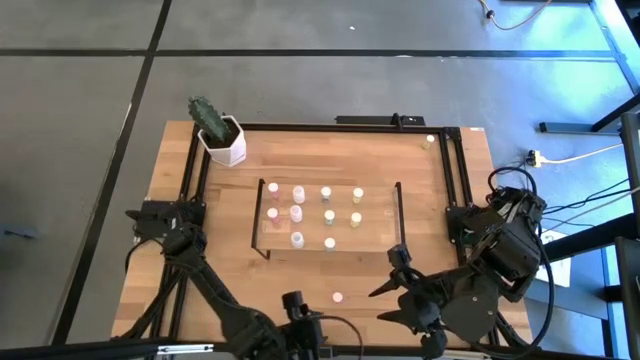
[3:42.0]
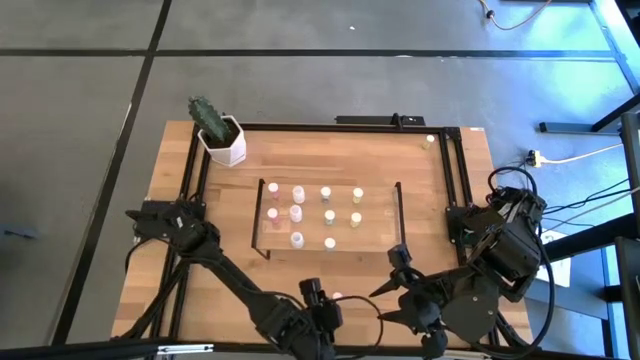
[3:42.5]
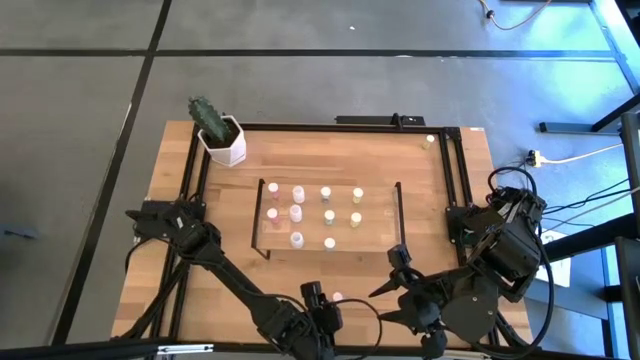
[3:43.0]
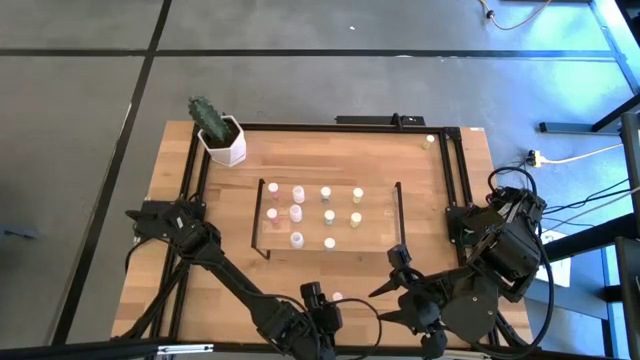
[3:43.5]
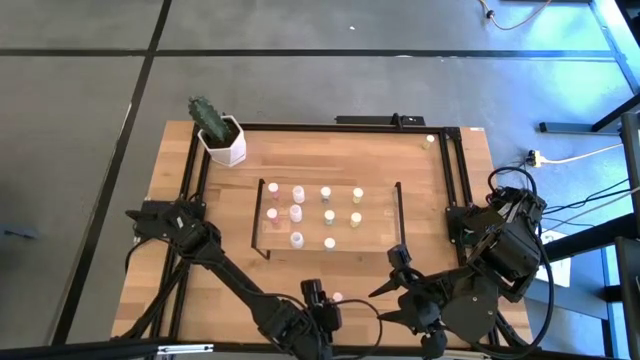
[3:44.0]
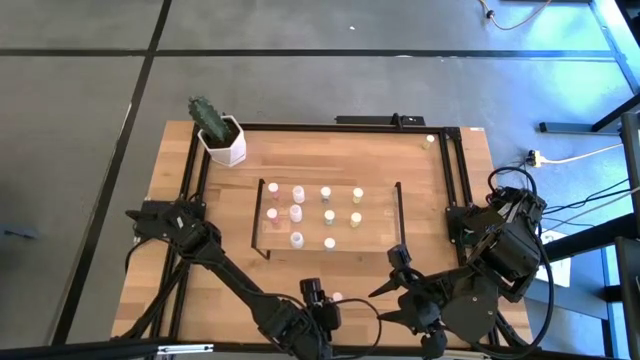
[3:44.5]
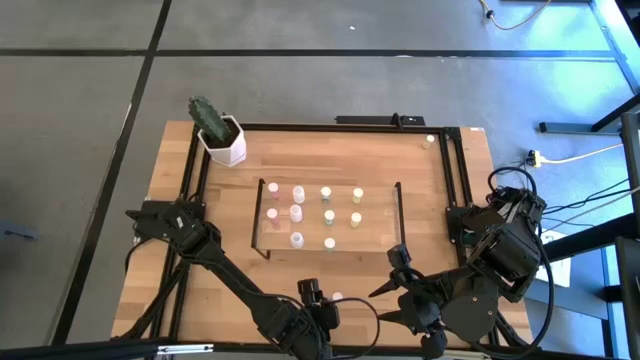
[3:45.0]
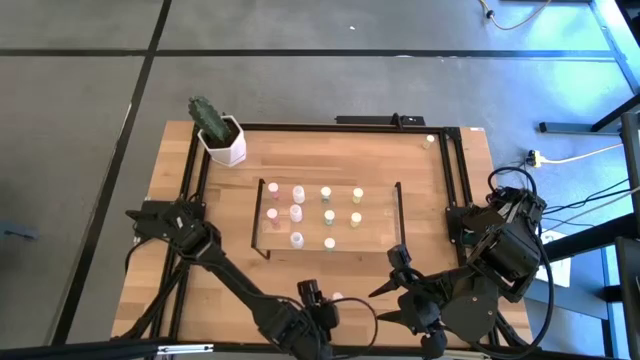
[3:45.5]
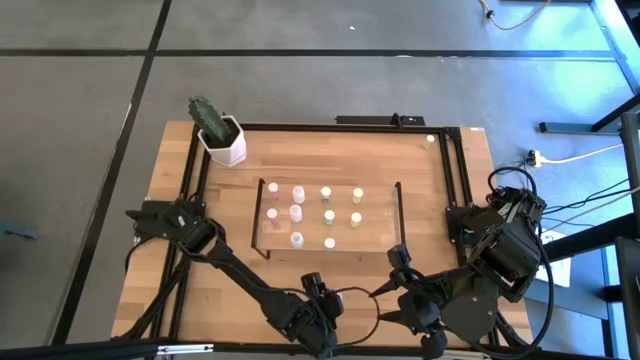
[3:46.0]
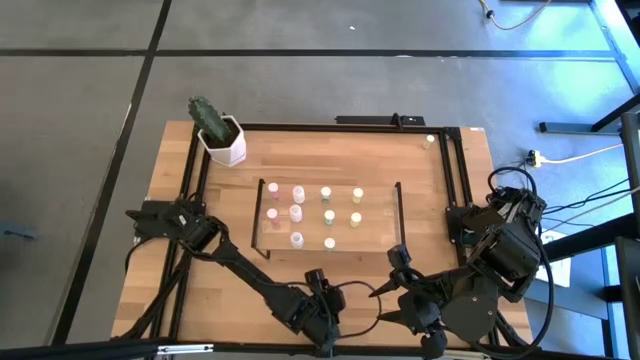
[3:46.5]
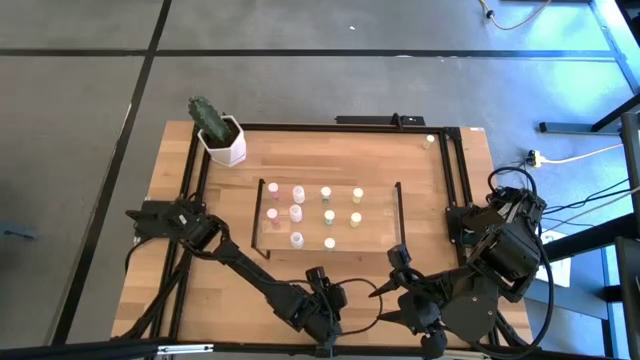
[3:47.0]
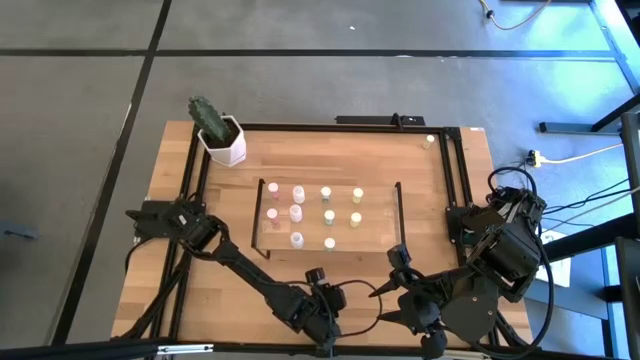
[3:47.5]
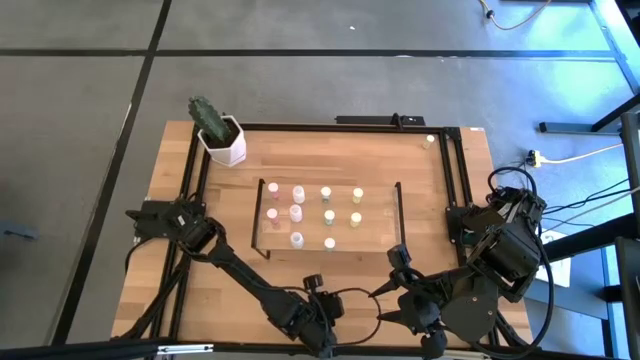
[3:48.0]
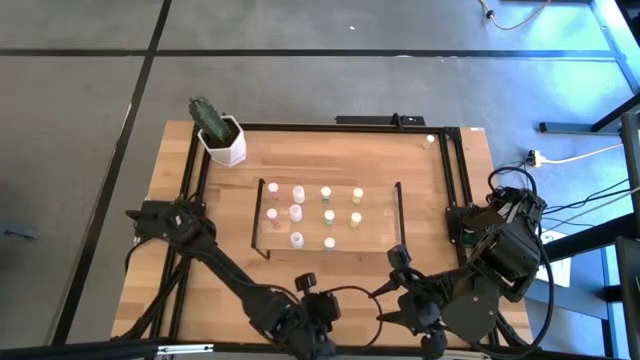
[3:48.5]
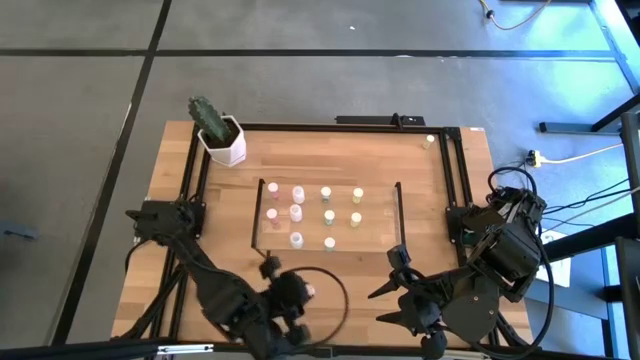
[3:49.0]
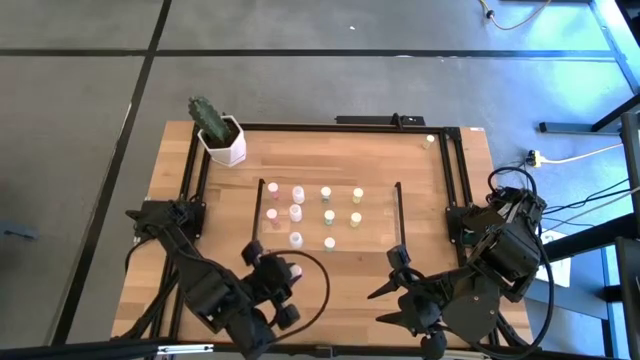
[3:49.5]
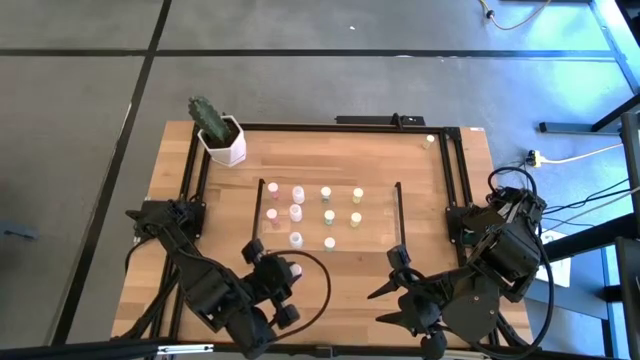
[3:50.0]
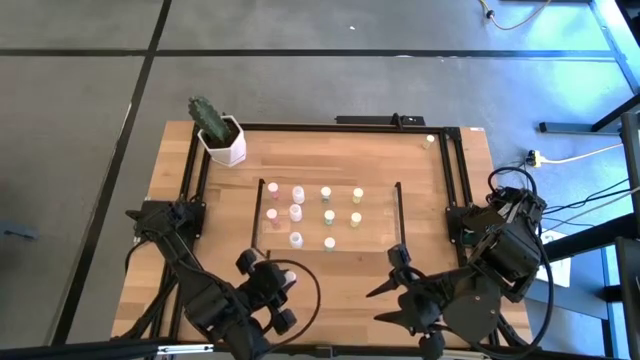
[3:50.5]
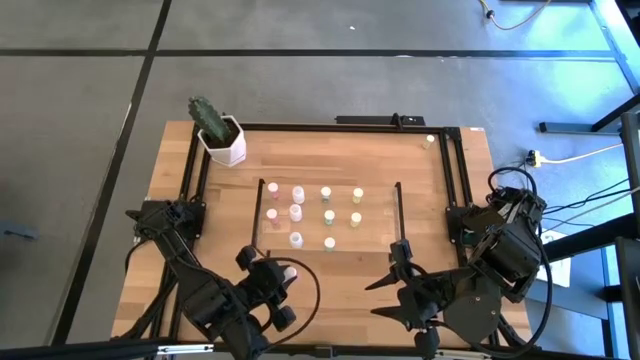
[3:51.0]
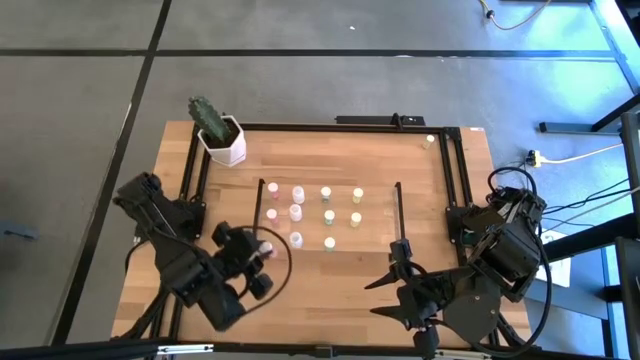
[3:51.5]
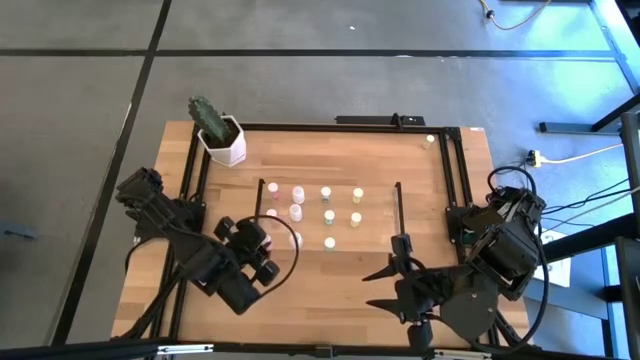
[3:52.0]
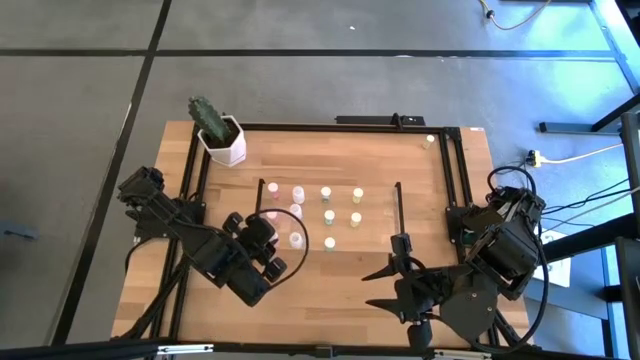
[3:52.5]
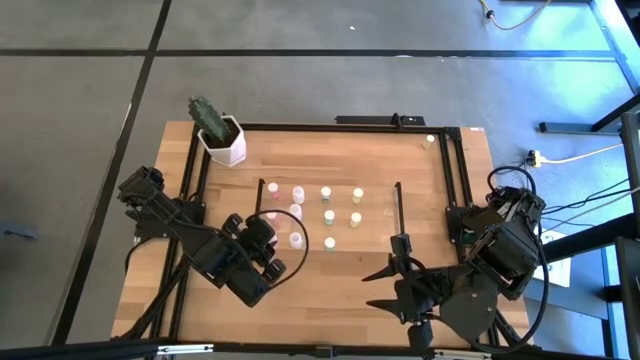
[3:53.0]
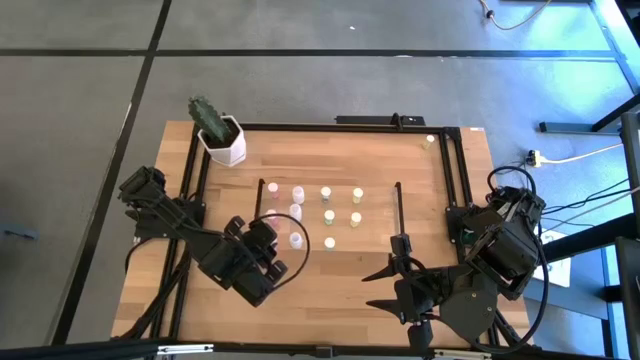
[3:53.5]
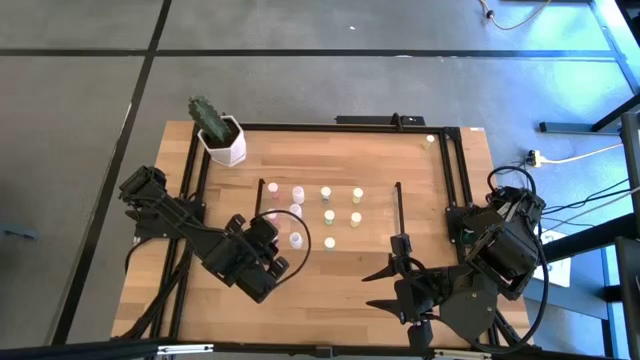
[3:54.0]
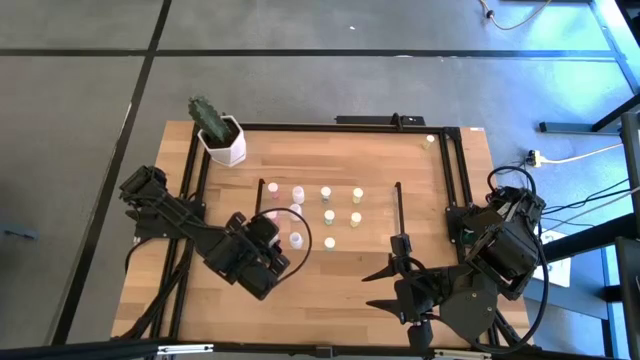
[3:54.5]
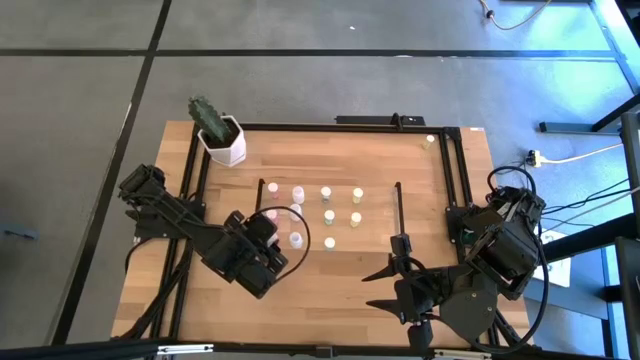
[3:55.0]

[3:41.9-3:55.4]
Task: Pick and place medicine bottles onto shelf by color
Put the pink pill bottle on the shelf aligned with the other pink pill bottles

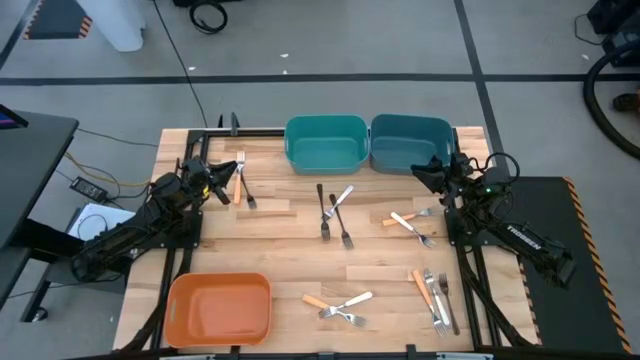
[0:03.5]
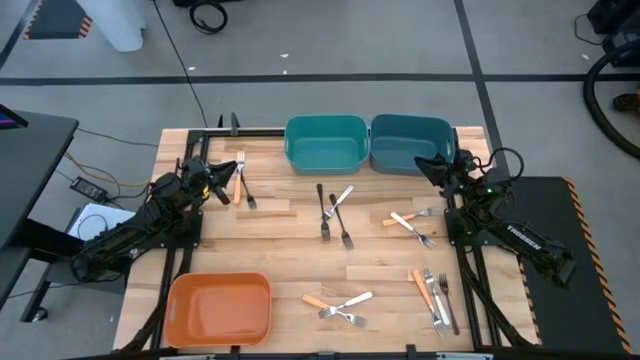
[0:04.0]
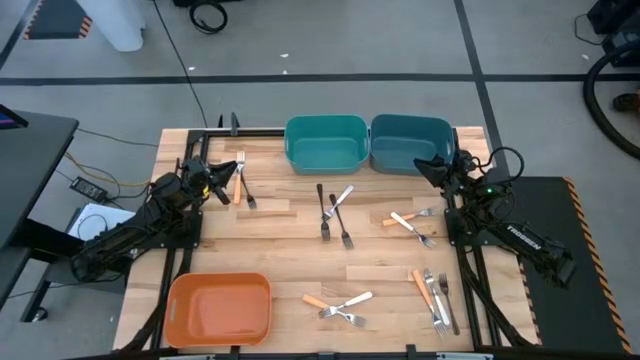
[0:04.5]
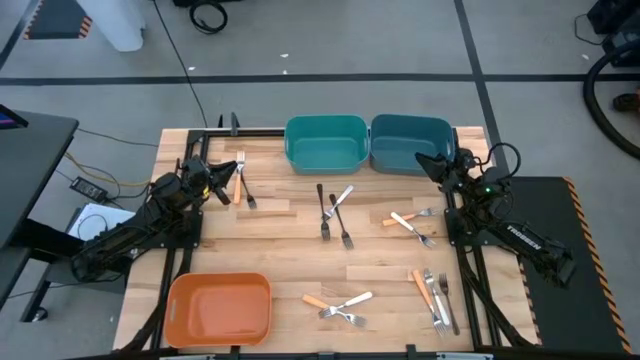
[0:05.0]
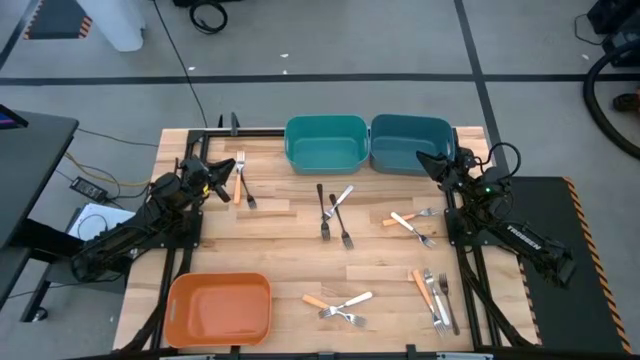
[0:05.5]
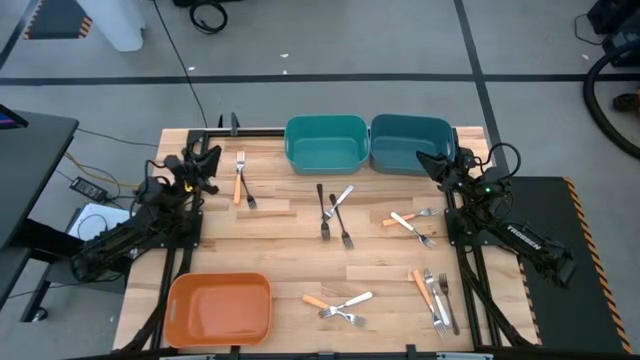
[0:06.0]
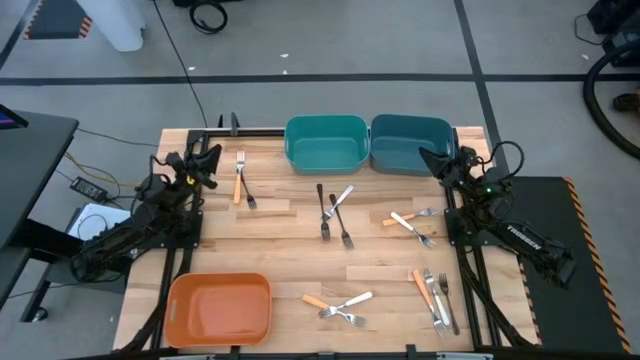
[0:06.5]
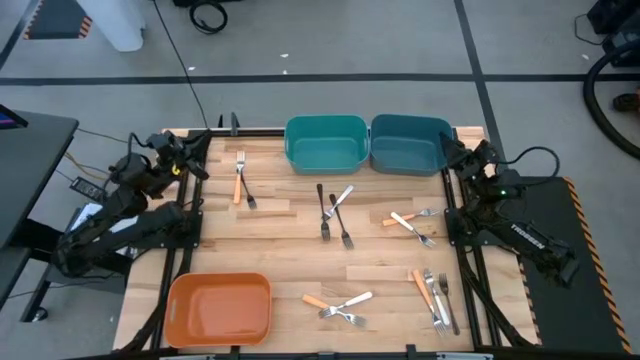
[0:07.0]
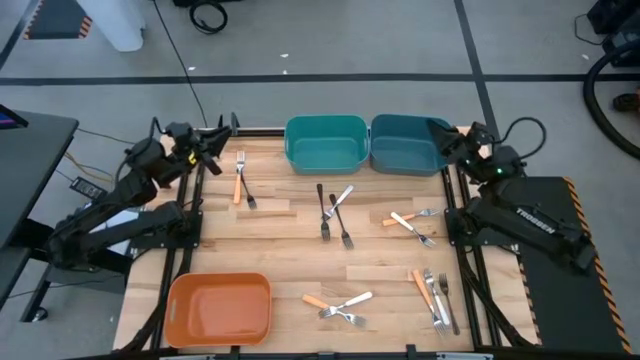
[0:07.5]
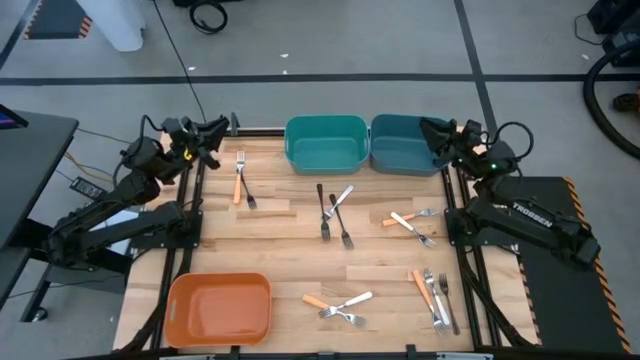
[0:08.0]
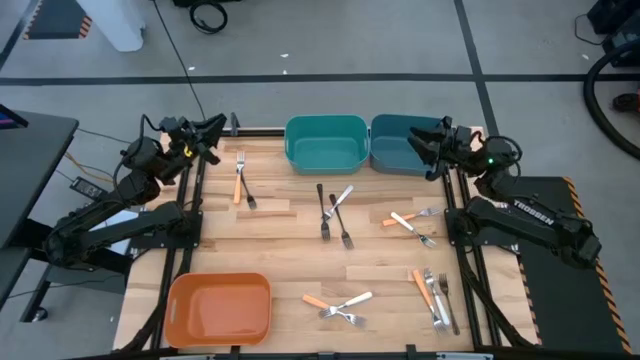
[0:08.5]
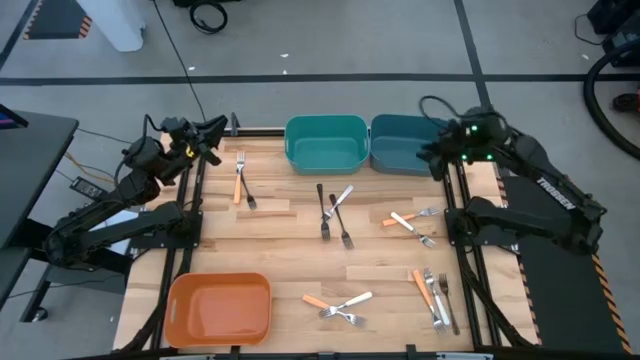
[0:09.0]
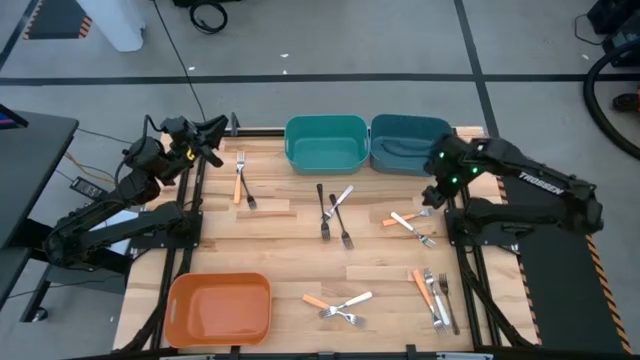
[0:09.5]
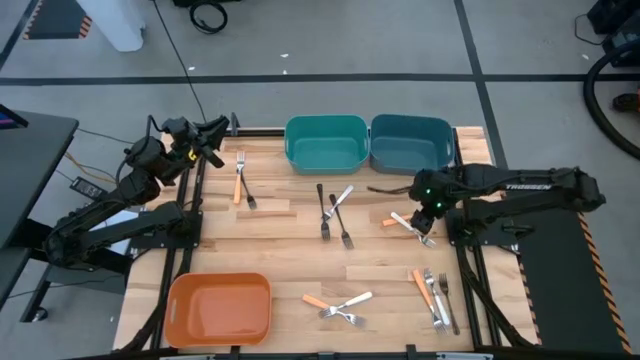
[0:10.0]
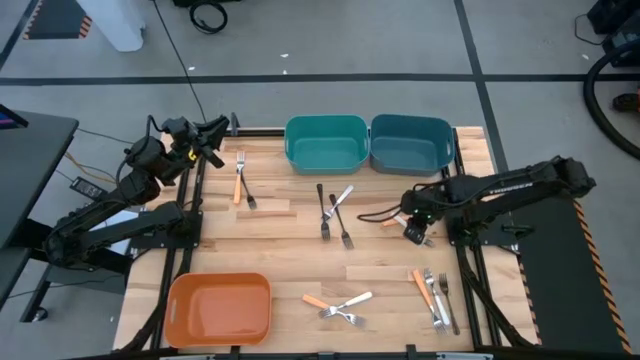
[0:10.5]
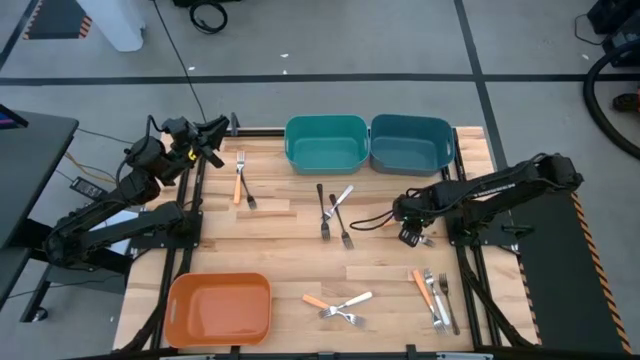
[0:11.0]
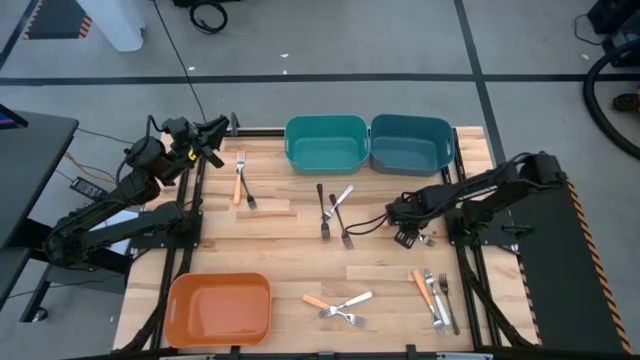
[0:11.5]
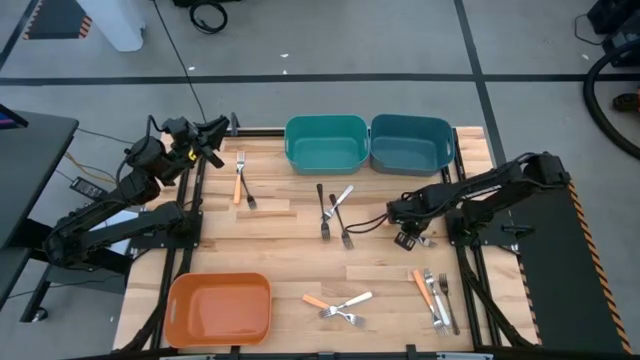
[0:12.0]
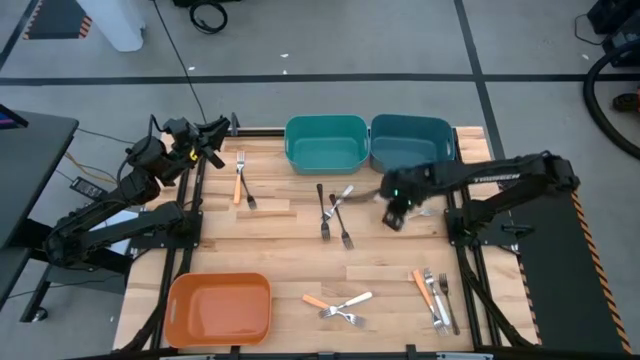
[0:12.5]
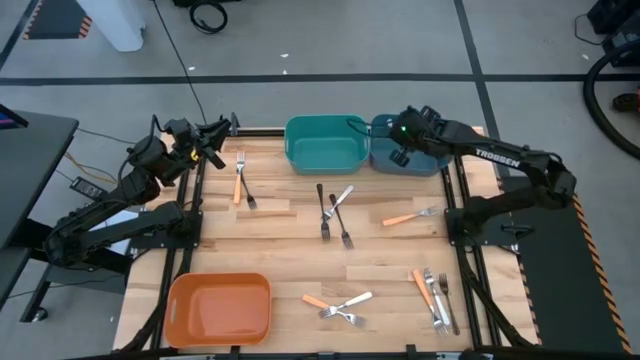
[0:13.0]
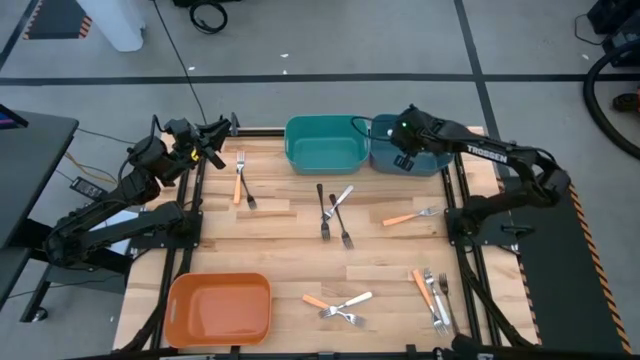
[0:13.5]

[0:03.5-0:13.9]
Task: Sort silverware by color (type)
Put the white fork into the blue bin
